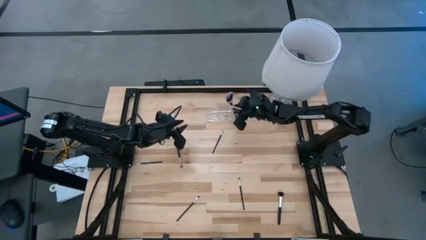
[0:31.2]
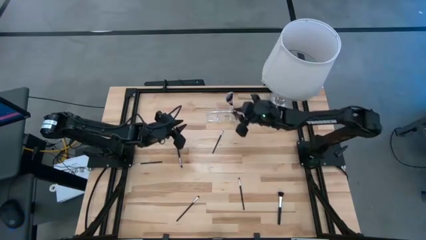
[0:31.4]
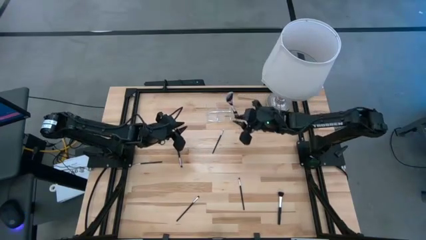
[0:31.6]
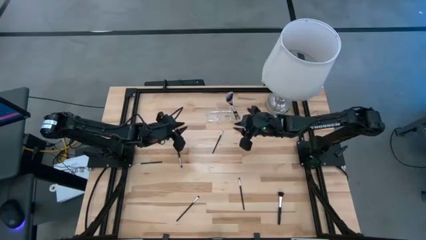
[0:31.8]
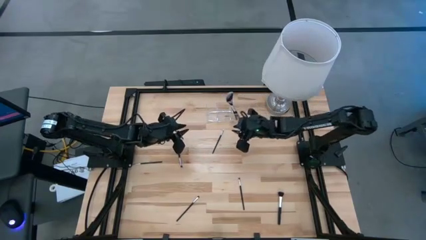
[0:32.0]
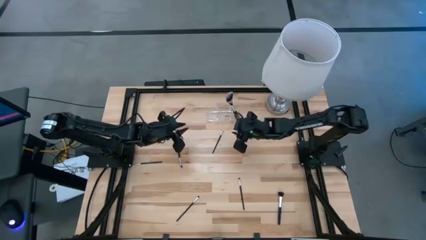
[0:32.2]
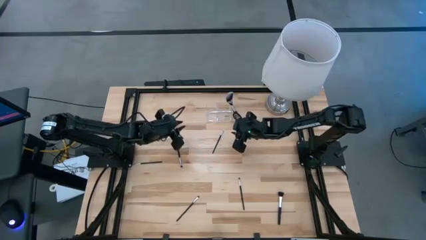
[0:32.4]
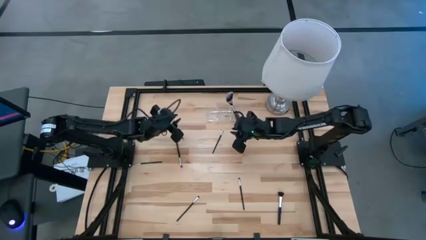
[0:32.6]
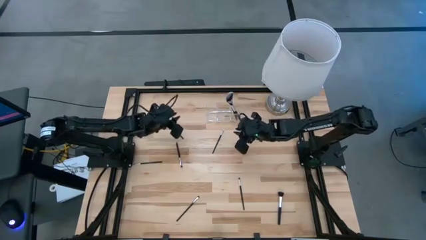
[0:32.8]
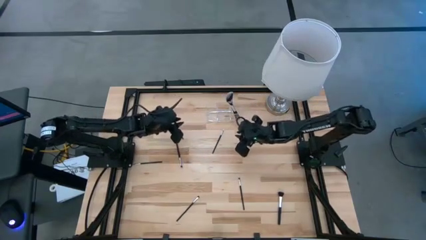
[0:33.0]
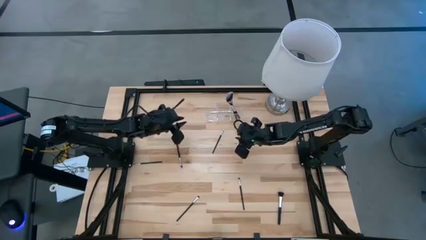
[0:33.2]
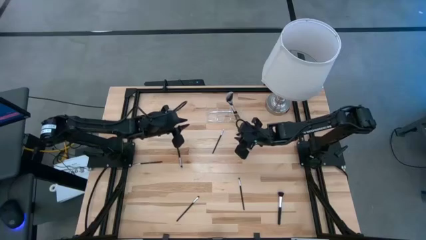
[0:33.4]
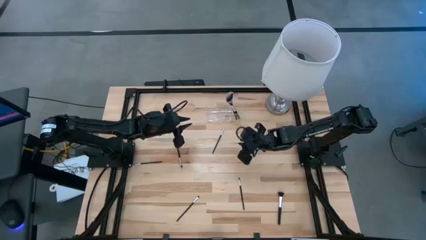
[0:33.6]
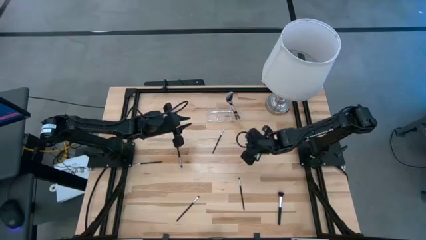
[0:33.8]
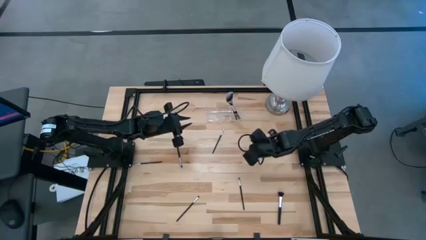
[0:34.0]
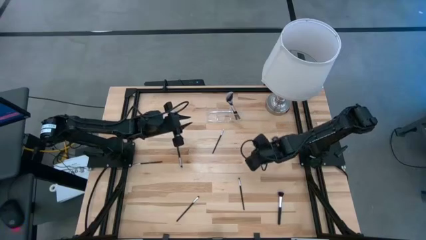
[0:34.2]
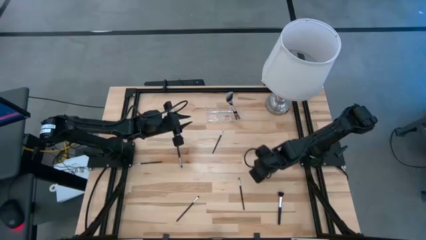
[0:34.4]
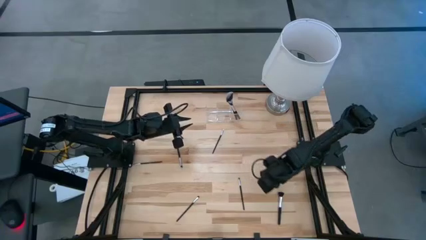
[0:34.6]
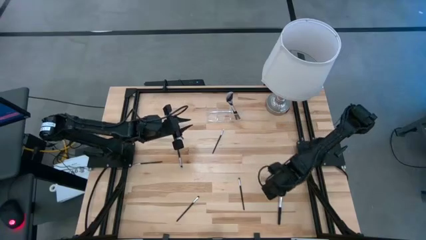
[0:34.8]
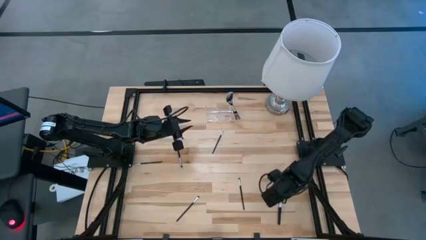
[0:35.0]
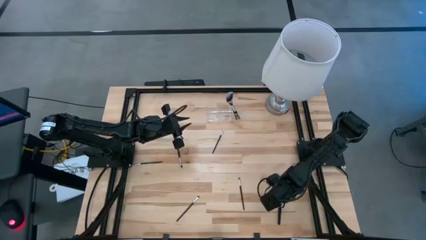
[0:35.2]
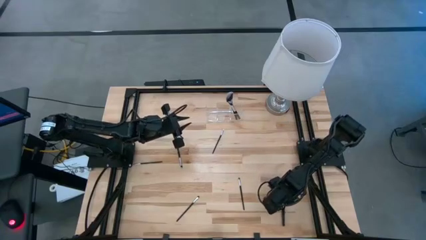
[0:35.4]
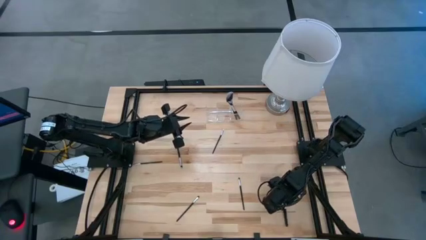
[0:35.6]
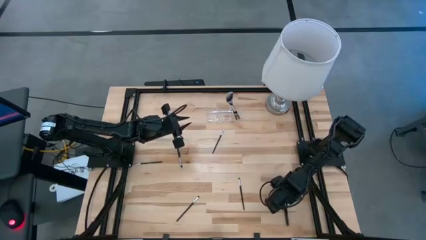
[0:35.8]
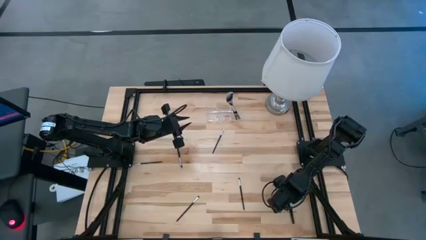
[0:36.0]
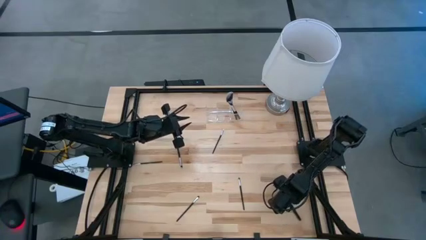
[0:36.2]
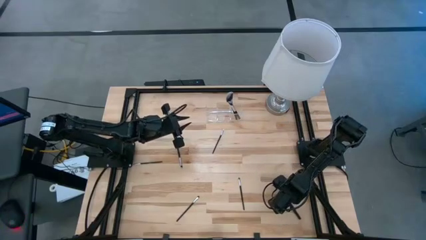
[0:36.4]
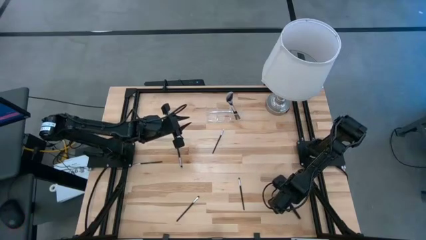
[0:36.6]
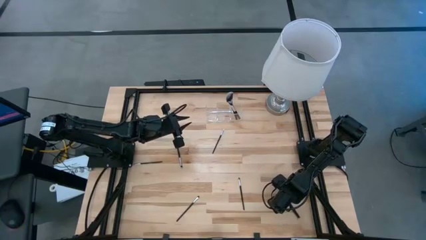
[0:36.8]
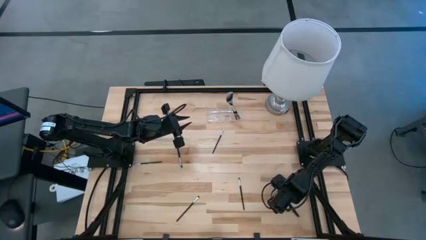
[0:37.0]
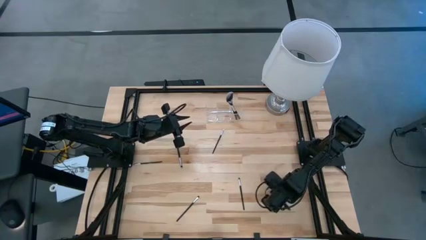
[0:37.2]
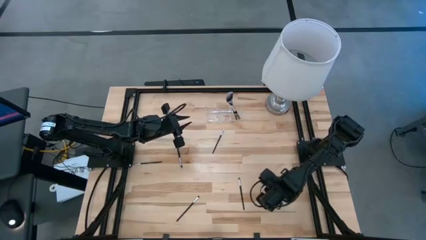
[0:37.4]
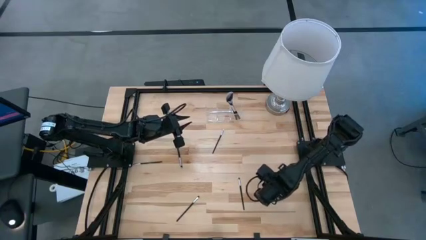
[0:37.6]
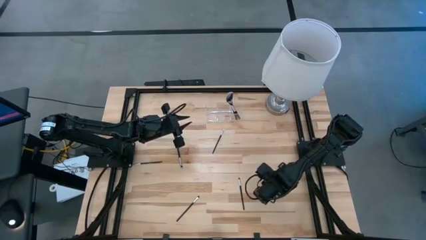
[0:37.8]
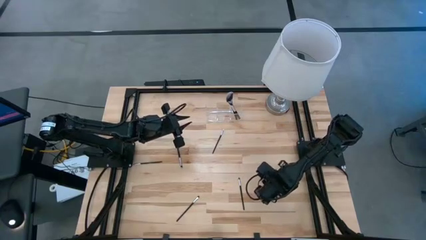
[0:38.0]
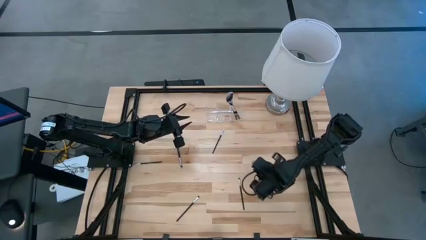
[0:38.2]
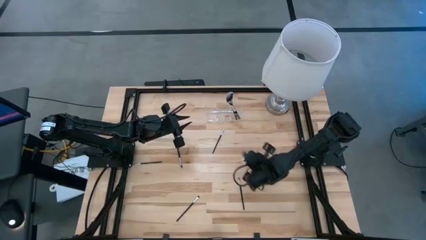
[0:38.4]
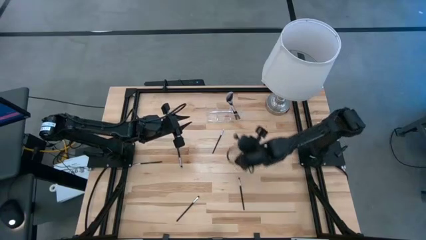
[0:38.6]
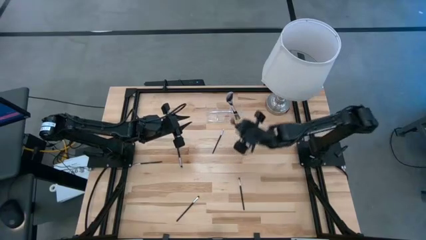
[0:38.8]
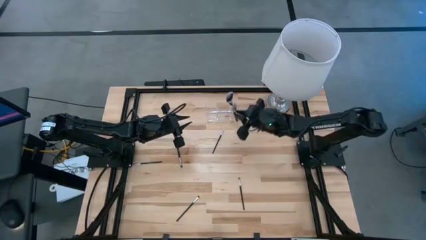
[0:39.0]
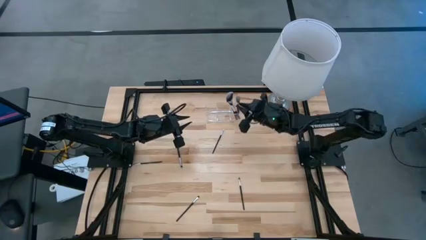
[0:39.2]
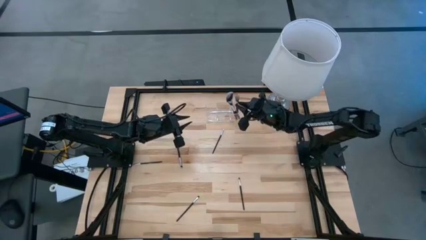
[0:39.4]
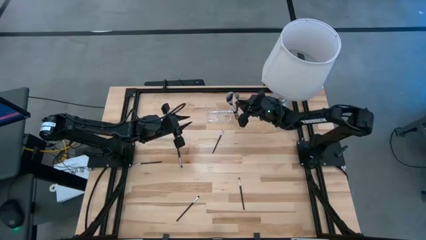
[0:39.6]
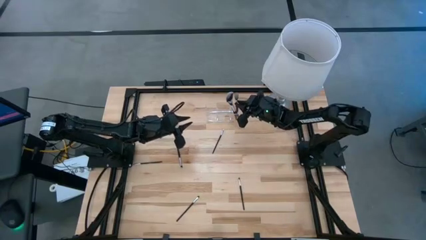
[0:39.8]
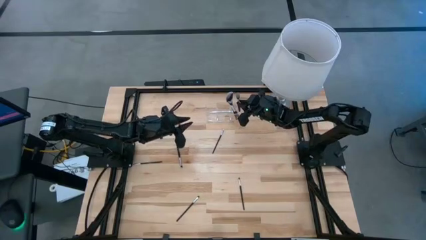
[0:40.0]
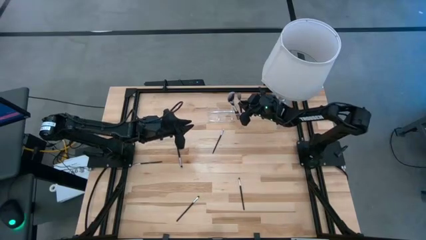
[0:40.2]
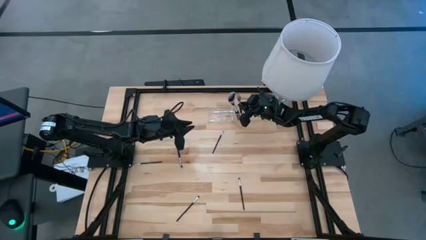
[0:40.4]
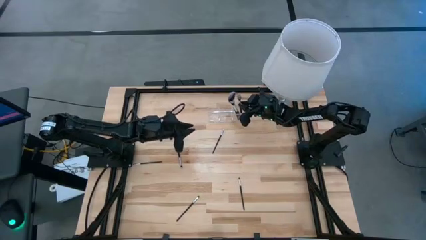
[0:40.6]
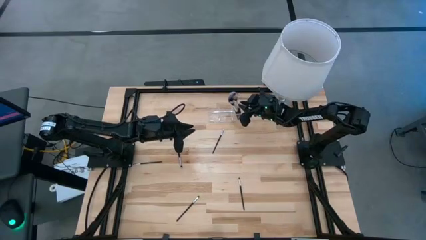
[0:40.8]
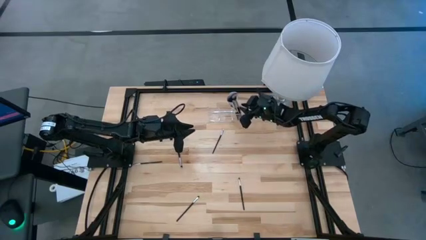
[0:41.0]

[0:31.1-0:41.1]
Task: Put items in baskets/containers
Put the silver powder brush into the transparent organizer

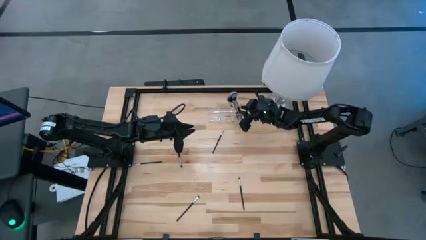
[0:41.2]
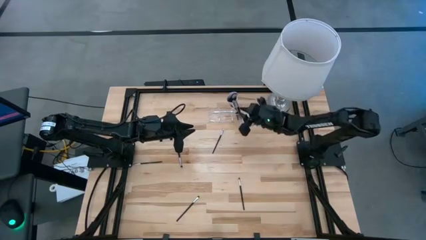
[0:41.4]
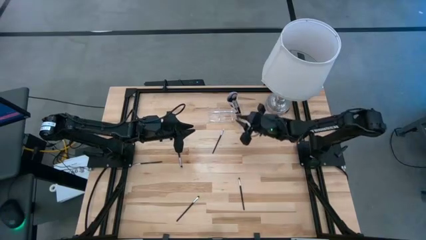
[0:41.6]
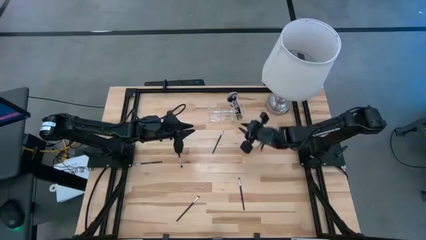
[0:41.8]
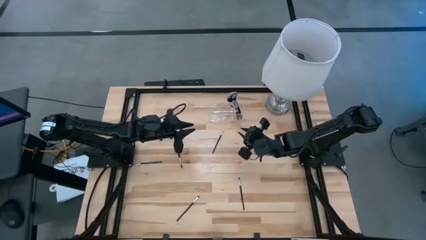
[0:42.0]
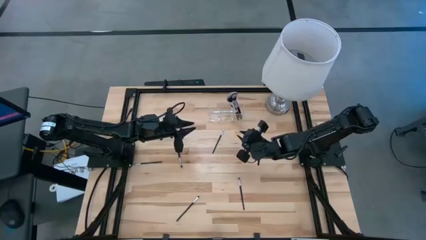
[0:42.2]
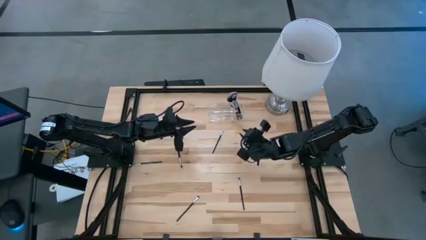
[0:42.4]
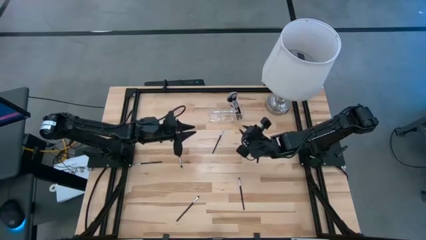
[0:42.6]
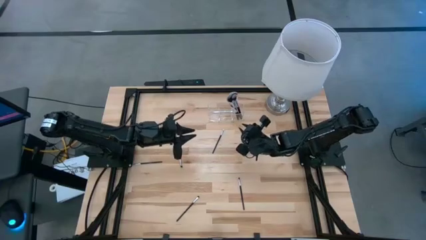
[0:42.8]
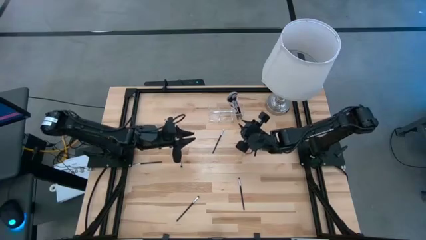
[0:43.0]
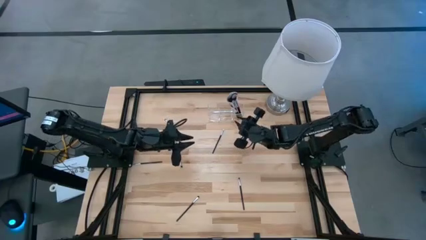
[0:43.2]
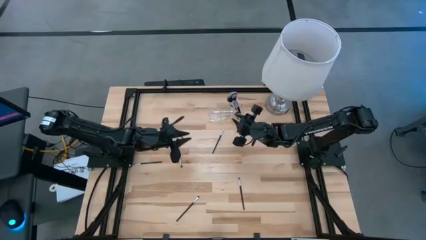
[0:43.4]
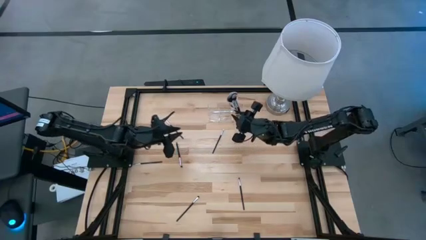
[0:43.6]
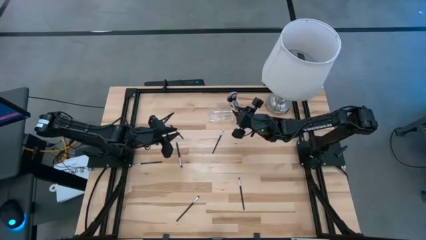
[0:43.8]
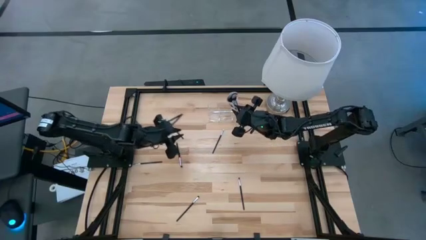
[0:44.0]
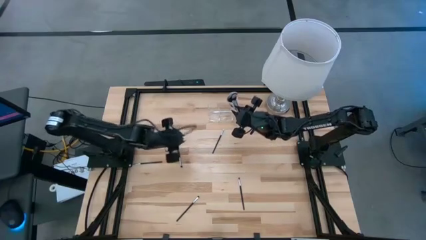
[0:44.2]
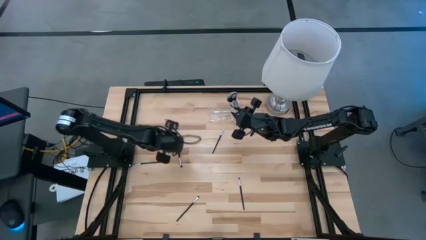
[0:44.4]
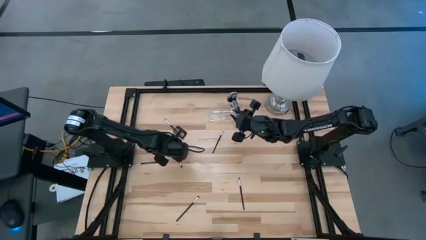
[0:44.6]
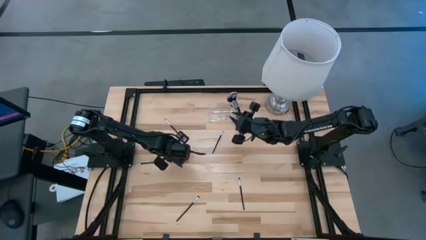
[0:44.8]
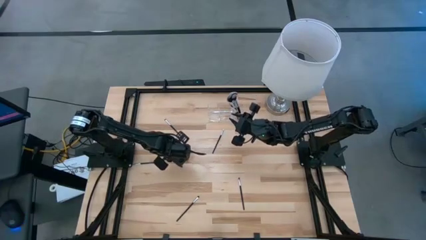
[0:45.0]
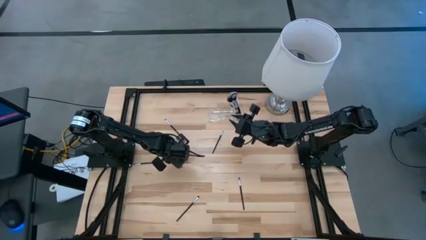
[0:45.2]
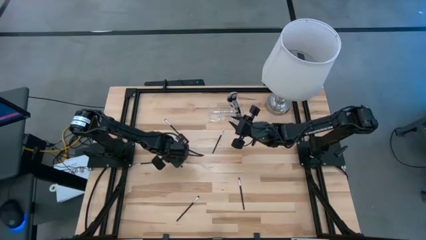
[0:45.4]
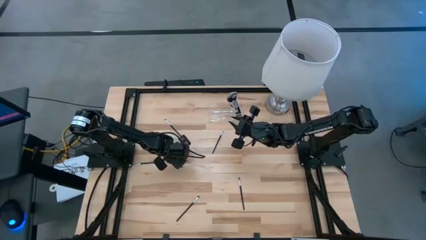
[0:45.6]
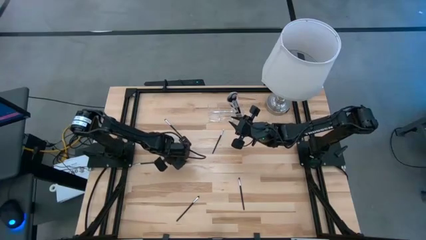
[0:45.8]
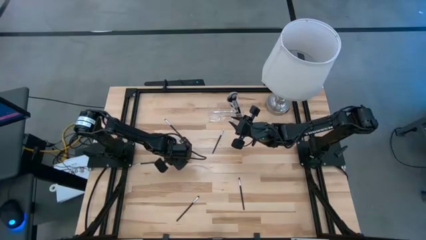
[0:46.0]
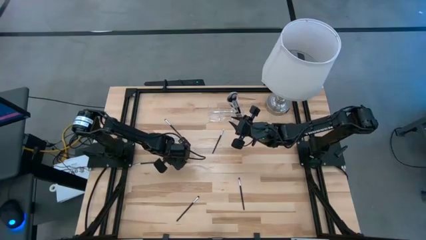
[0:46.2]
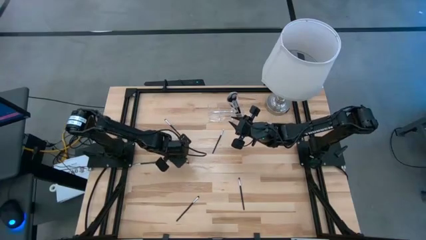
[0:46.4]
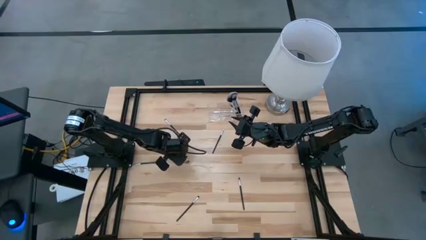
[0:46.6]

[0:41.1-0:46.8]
Put the silver eyeshadow brush into the transparent organizer

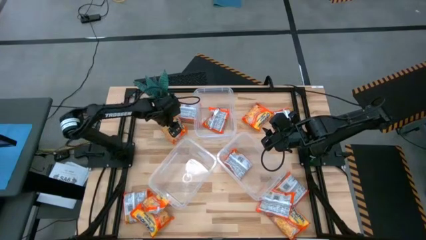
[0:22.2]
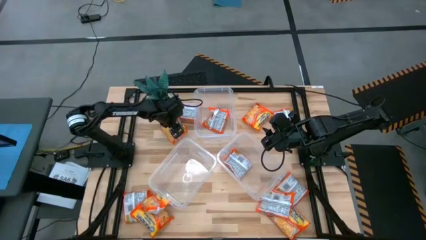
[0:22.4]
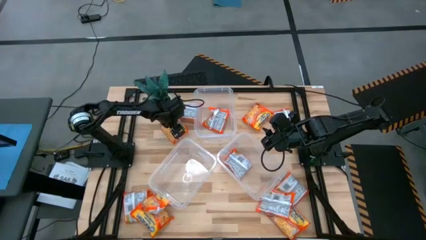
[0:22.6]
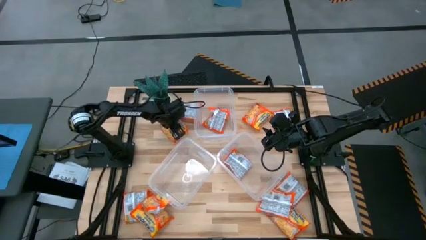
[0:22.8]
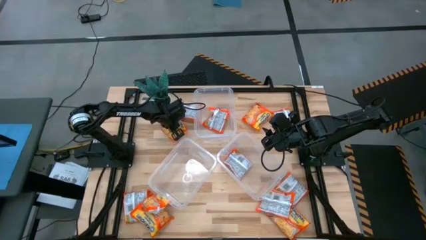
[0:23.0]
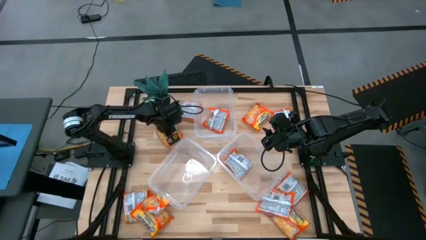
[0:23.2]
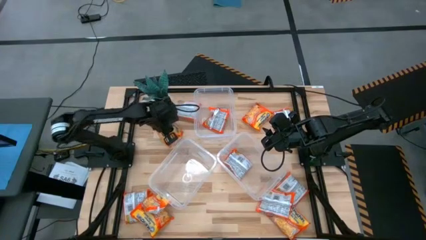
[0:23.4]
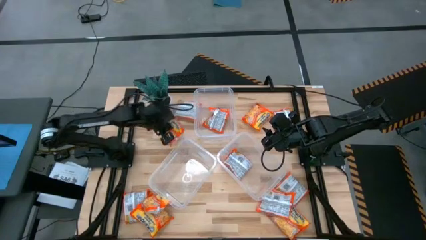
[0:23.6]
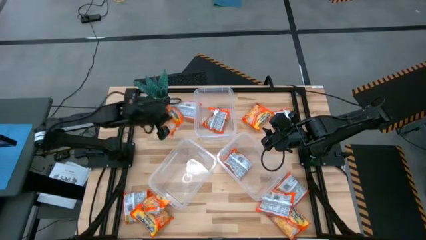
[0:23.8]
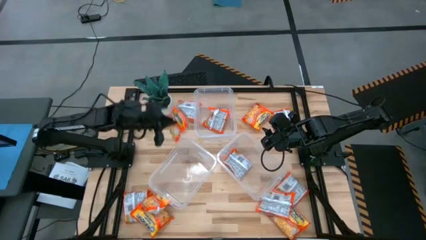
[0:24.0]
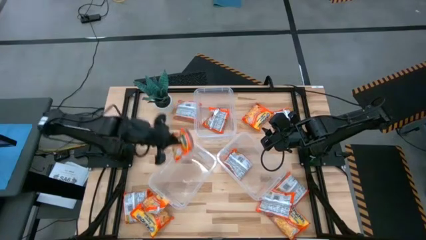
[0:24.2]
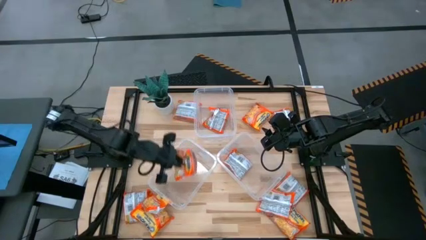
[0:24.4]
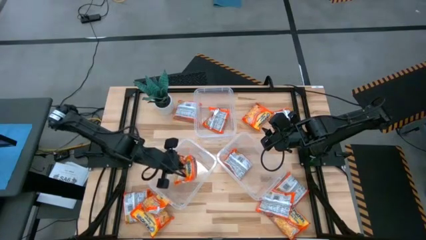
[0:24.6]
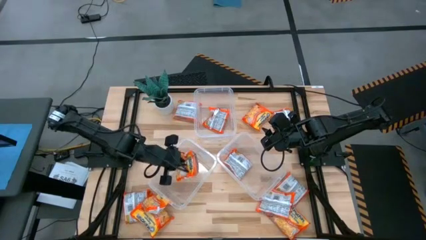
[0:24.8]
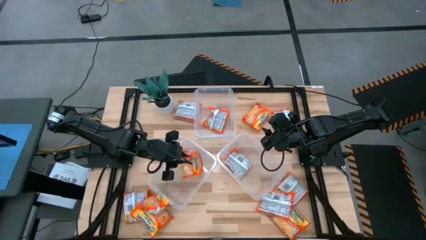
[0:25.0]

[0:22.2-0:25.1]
Task: Sort Maruchan noodles
Put the noodle pack into the bottom left transparent bin
